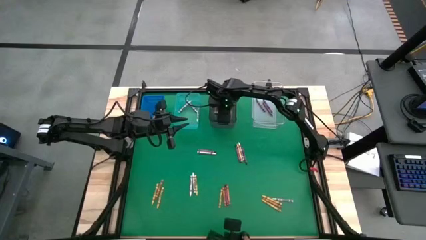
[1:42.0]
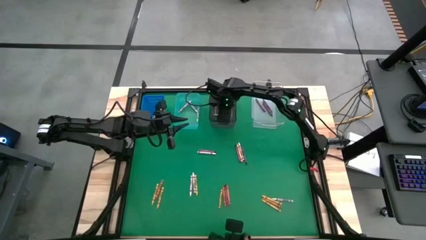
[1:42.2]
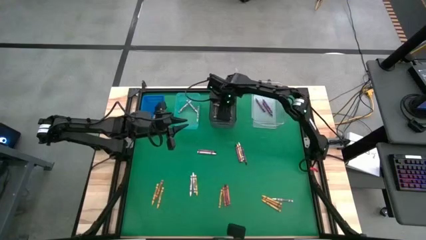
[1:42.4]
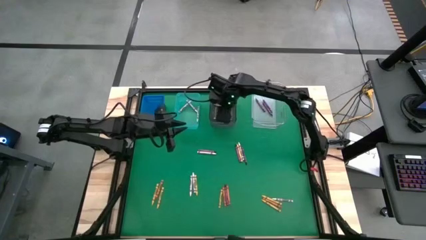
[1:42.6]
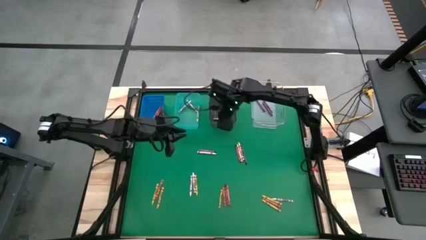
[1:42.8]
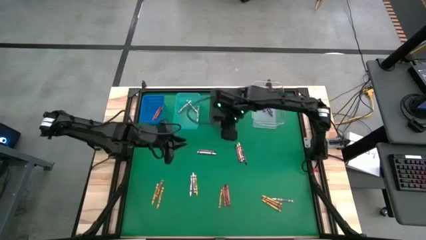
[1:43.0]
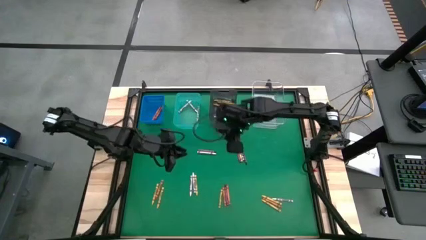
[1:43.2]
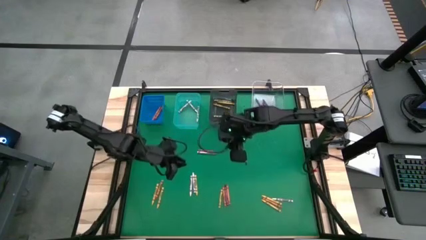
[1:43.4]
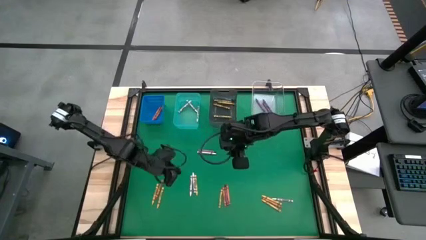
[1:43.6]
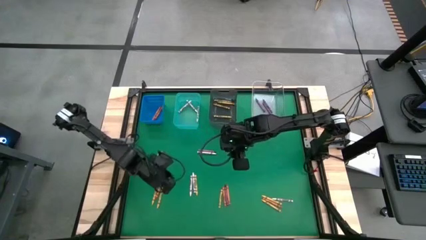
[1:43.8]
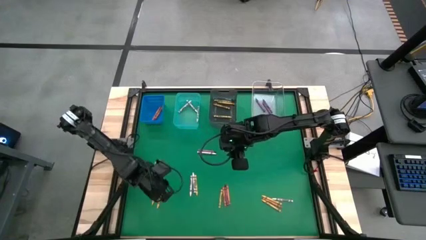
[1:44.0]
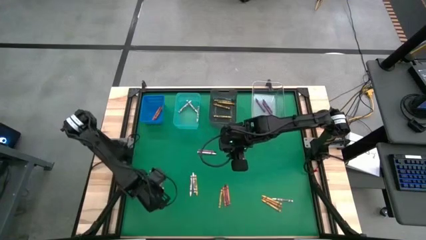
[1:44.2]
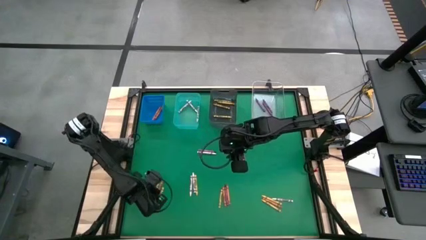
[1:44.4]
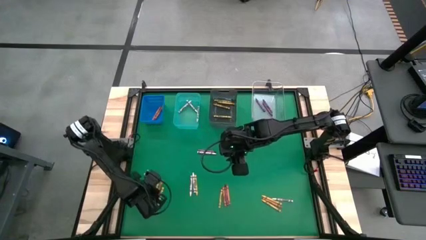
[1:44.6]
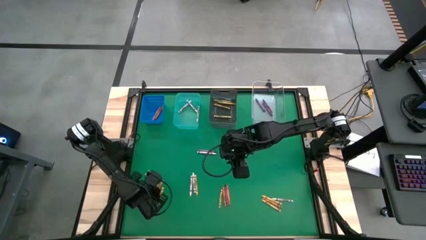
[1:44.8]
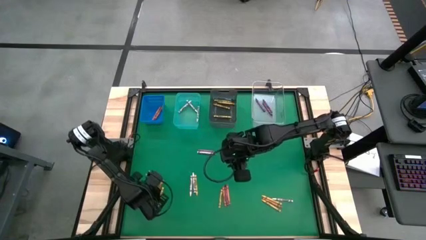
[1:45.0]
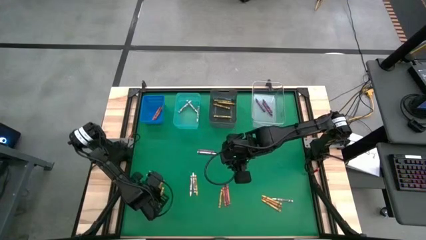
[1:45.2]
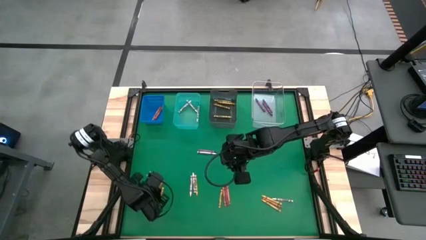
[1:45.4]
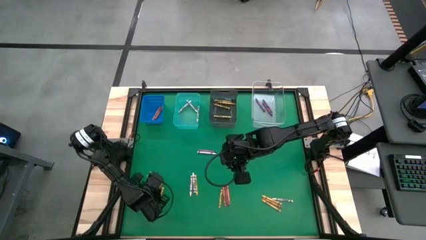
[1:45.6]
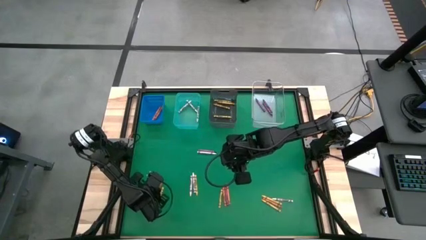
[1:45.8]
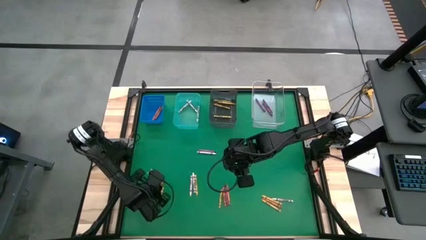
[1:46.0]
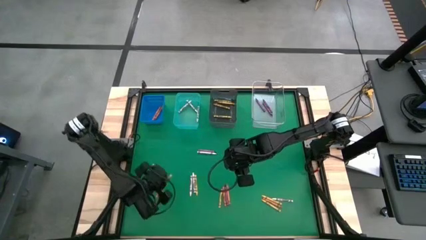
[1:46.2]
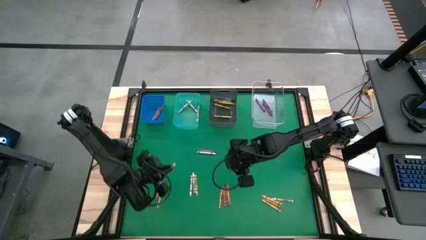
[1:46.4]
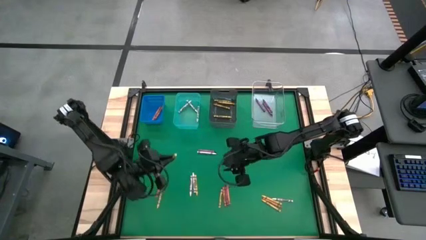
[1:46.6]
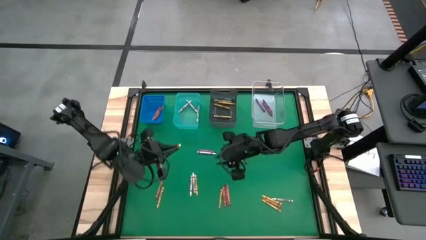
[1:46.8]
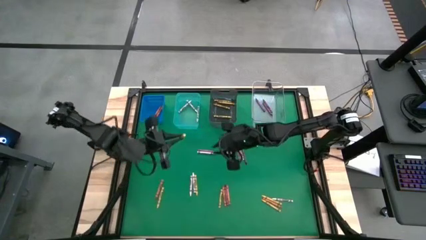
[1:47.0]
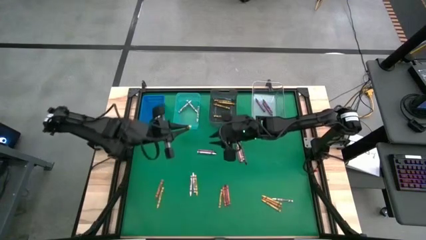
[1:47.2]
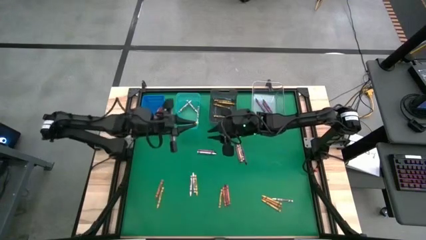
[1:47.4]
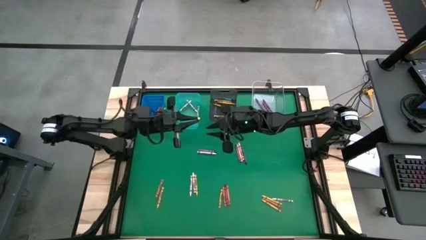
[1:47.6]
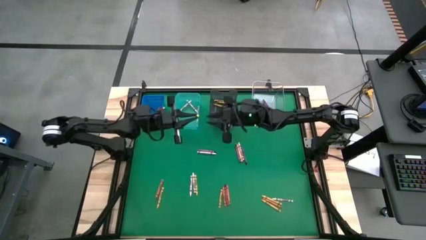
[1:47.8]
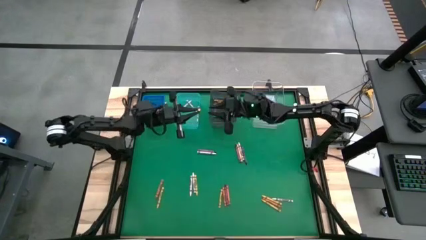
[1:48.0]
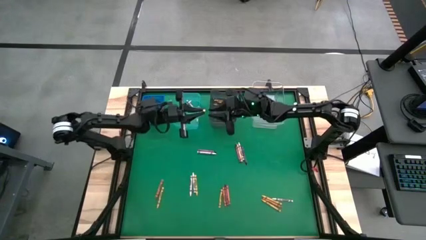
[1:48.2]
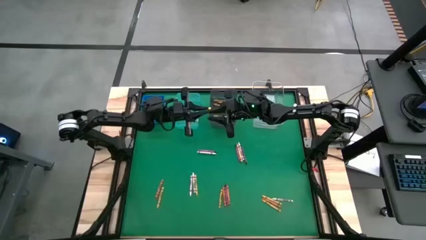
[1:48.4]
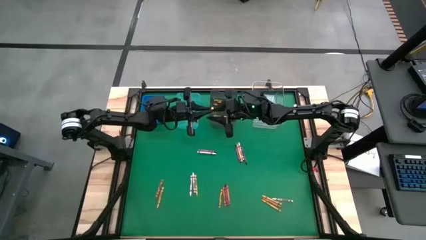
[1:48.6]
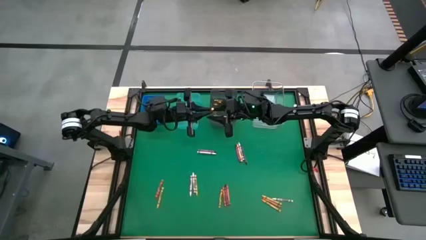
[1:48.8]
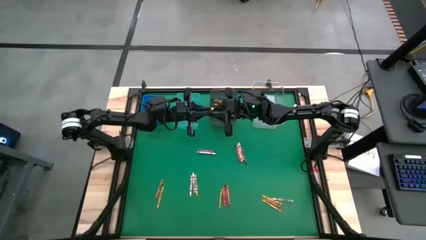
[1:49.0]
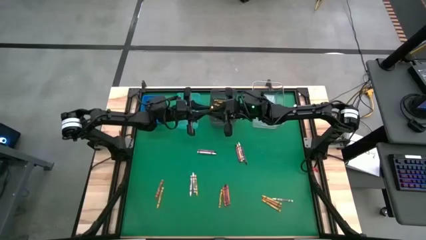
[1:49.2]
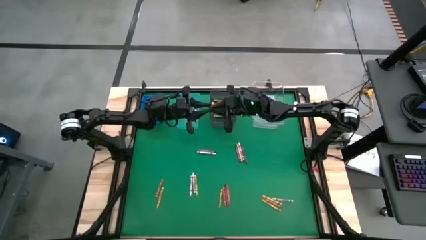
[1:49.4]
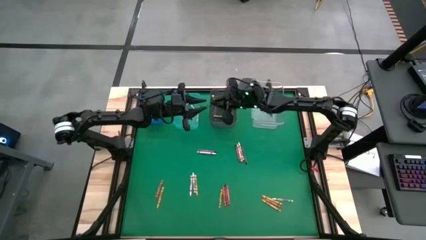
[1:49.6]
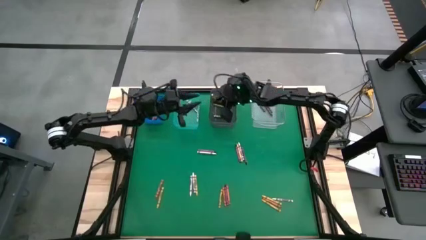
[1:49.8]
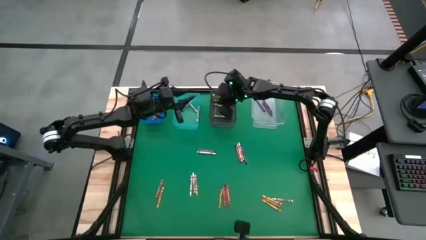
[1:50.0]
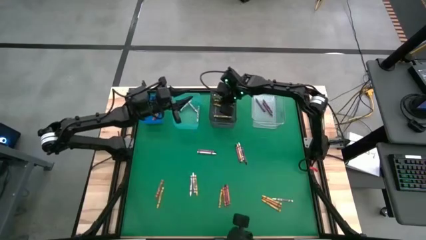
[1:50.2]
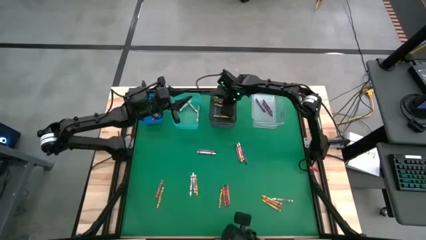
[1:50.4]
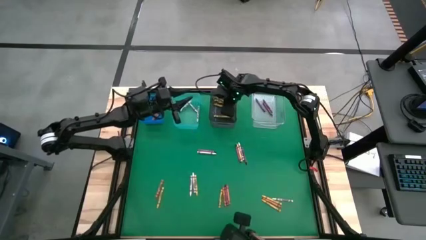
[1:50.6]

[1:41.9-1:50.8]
Task: Sort crayons
Put the yellow crayon into the black bin

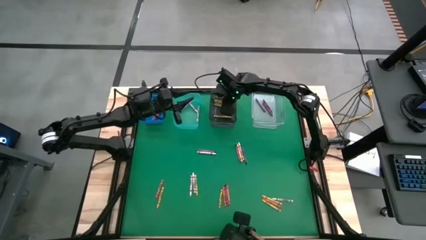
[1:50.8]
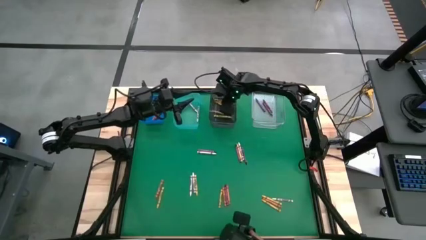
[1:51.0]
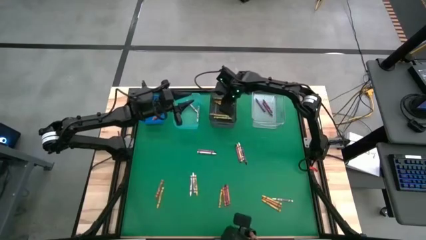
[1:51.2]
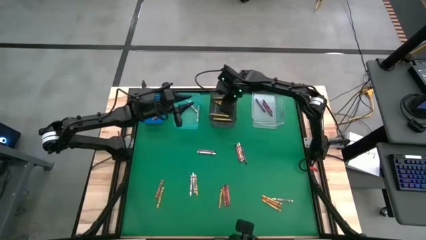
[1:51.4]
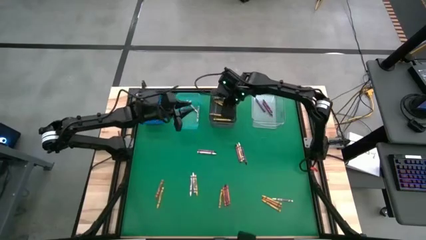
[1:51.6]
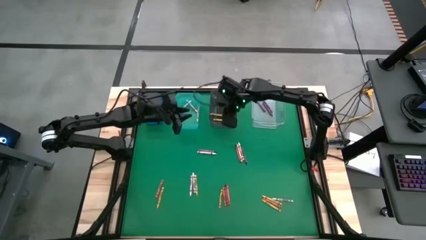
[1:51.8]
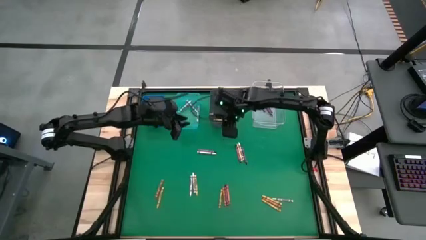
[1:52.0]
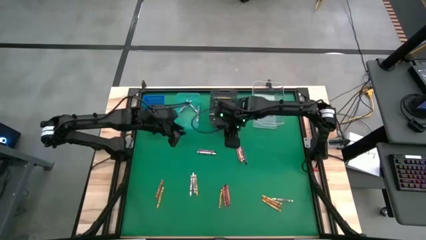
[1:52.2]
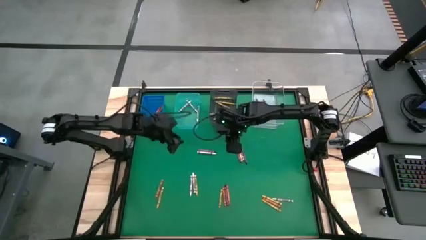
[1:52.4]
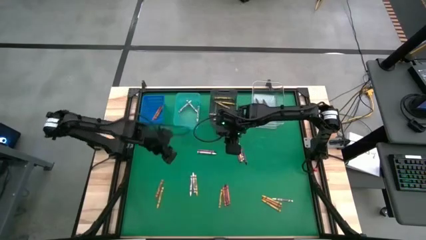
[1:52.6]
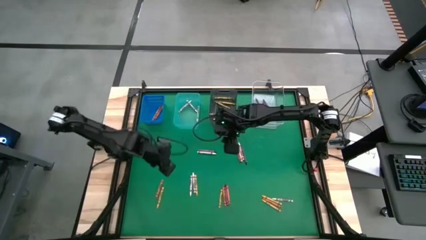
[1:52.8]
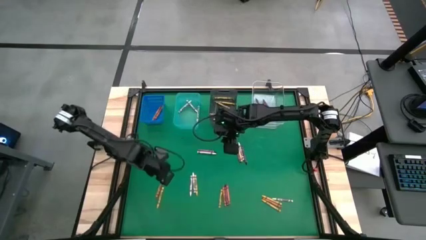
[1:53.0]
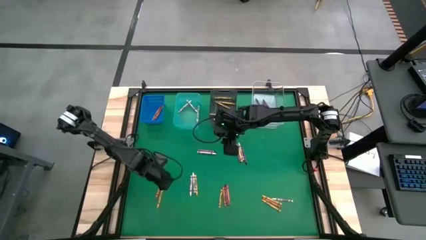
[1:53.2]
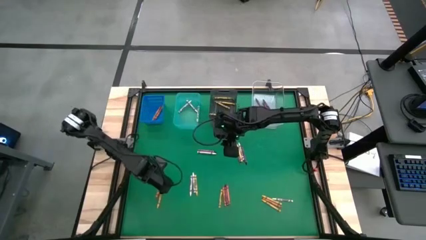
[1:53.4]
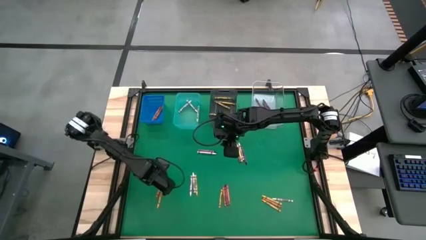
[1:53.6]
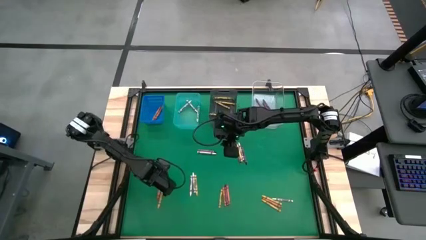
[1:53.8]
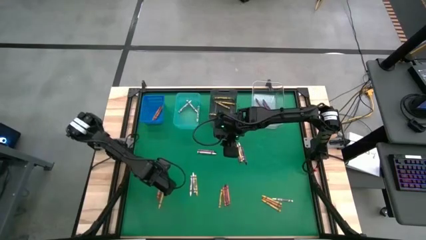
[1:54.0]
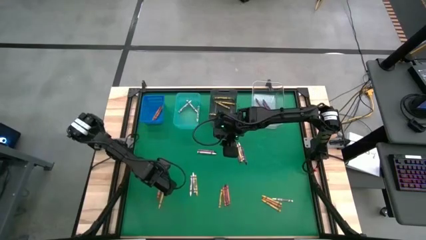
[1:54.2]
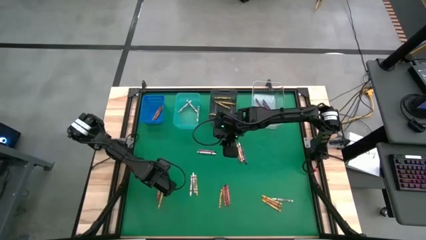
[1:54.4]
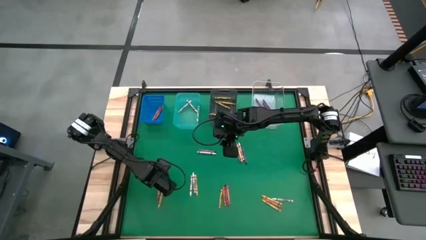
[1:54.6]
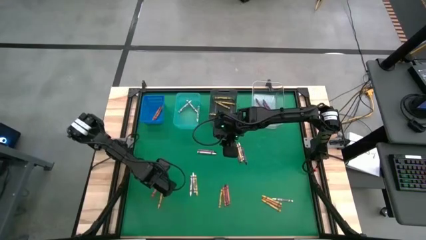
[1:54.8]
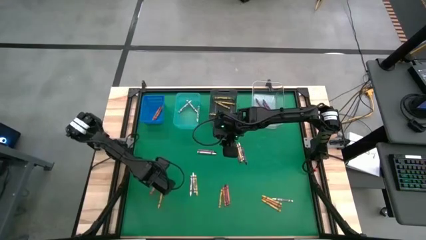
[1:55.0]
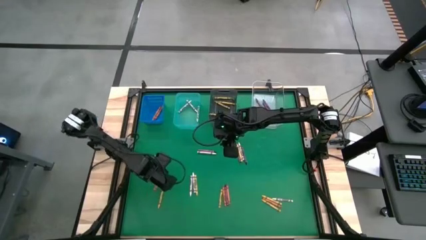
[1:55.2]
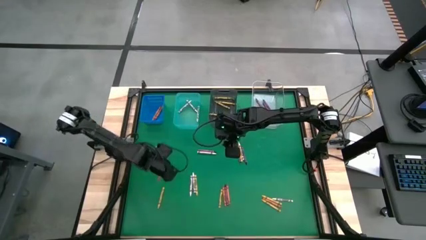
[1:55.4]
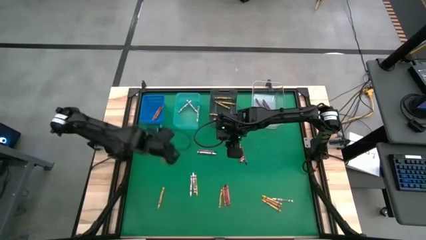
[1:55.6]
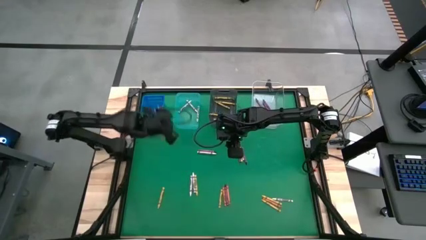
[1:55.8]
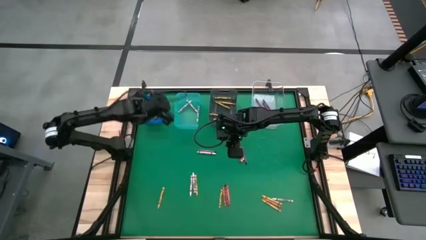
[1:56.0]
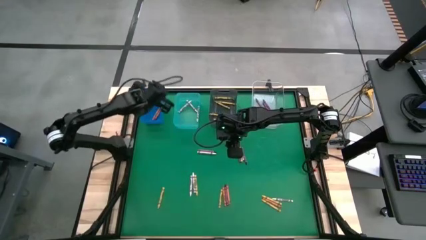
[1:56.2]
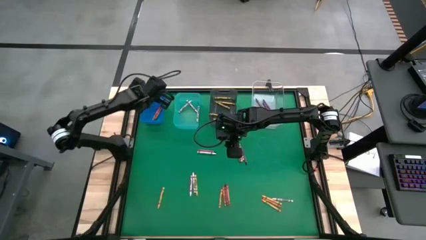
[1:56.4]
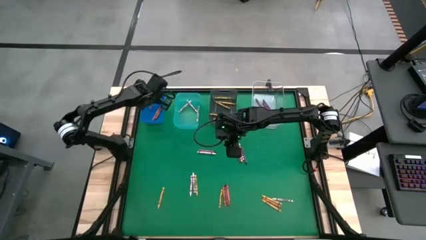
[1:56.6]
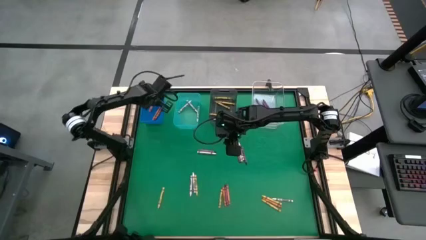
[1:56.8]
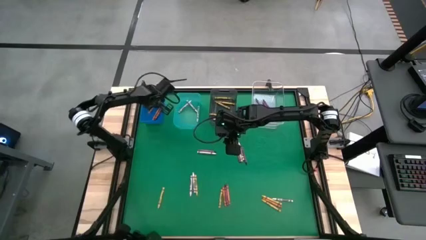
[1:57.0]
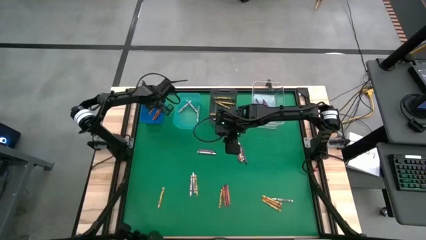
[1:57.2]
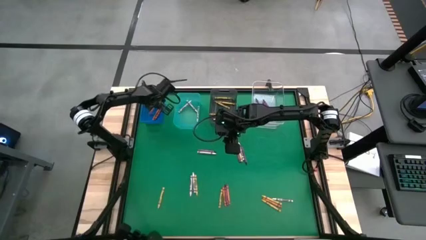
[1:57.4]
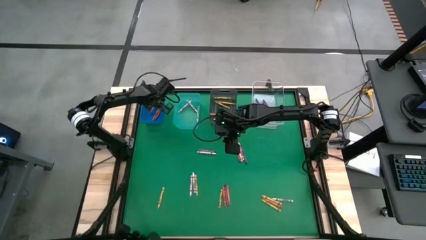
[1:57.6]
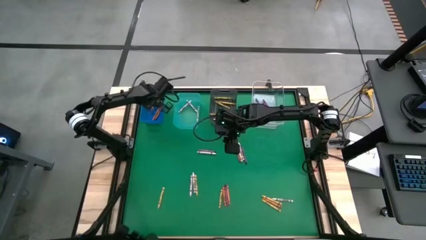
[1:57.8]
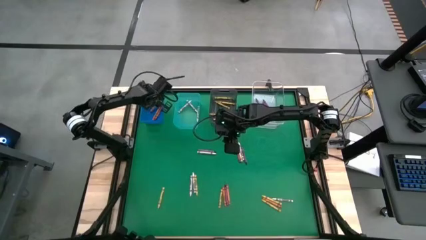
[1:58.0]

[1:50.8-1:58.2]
Put the red crayon into the blue bin
